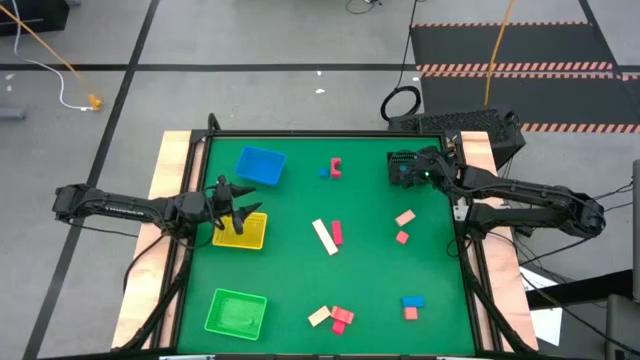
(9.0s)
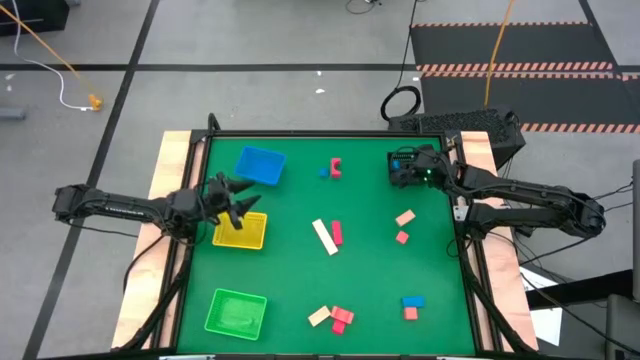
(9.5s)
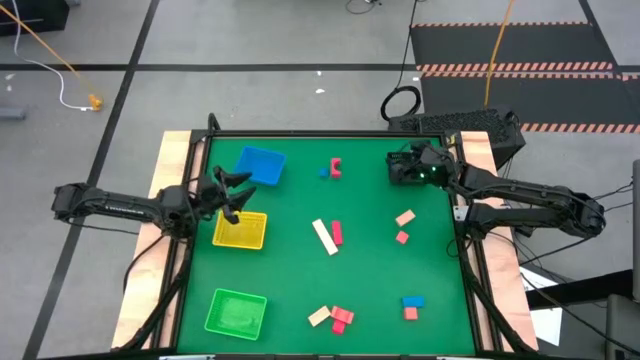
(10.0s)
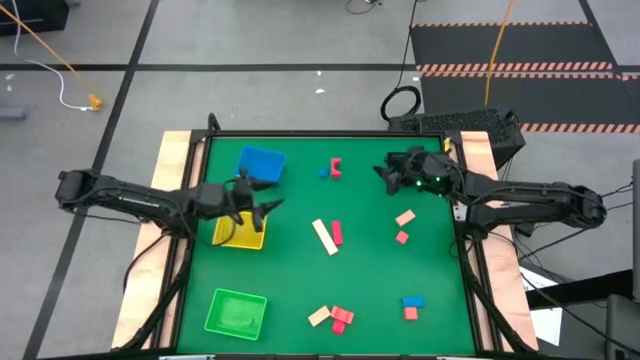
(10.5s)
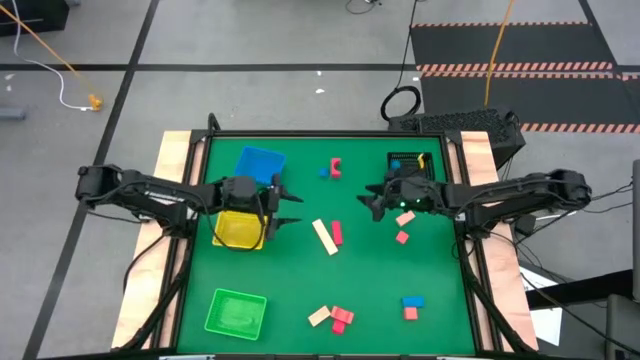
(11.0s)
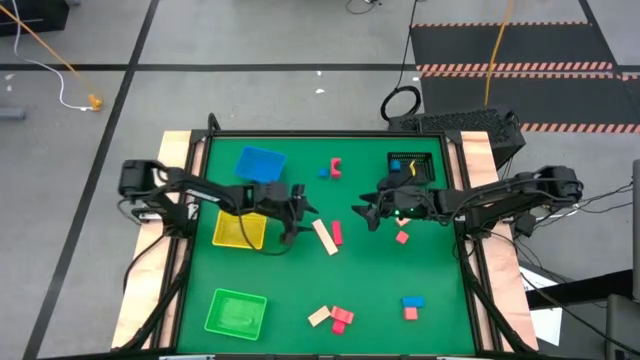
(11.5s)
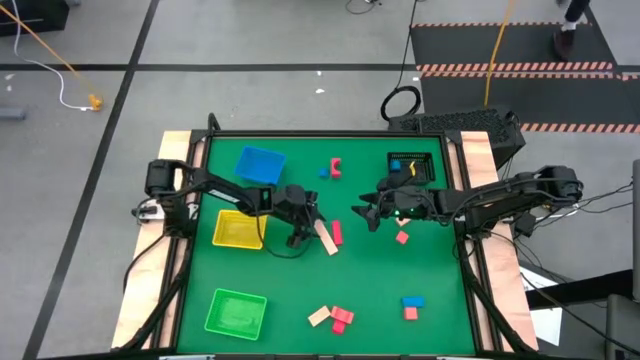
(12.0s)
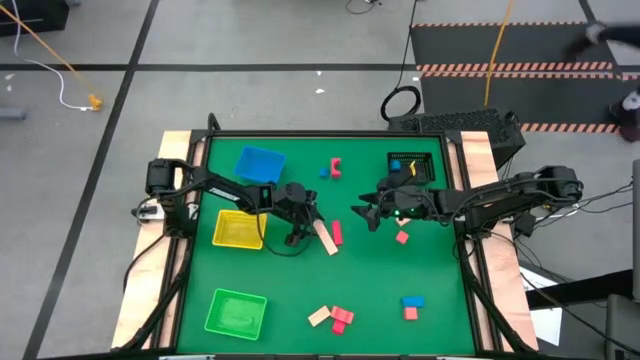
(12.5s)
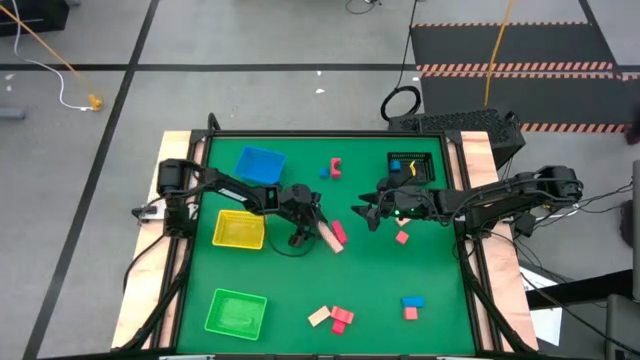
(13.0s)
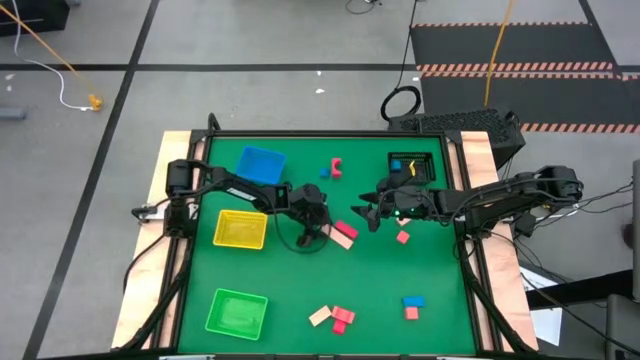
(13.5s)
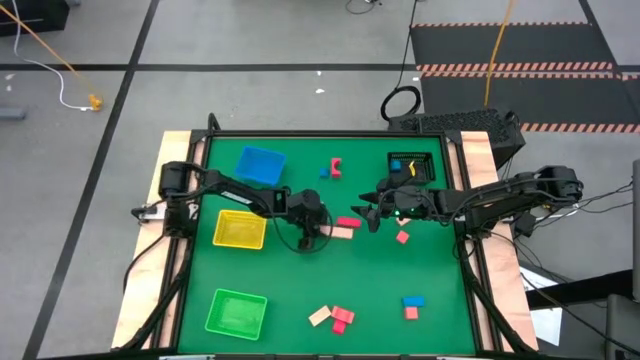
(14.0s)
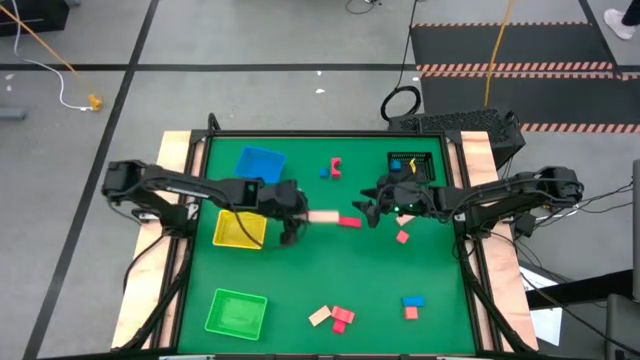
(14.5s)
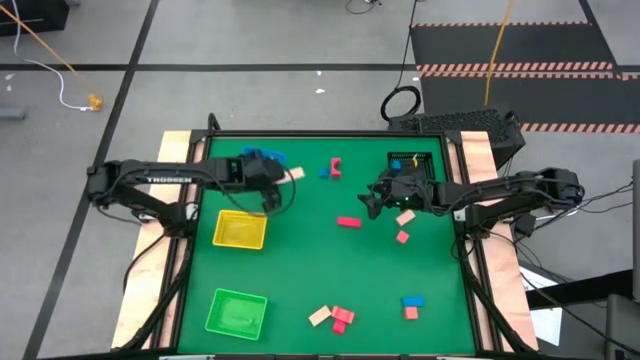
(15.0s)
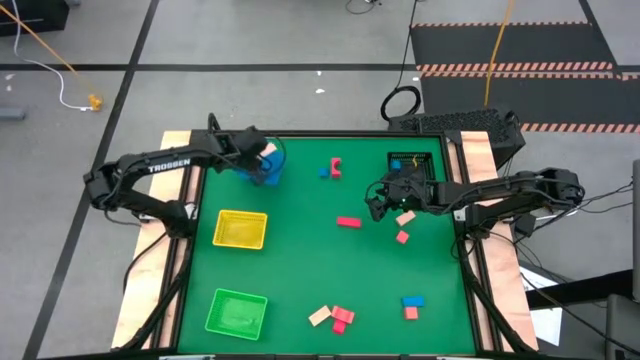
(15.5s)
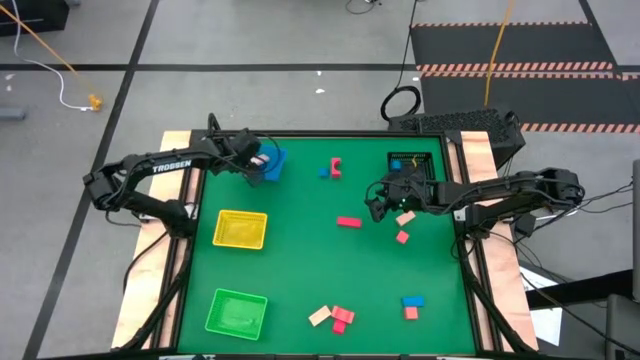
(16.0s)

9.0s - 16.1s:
Task: Sort & place blocks by color
Put the middle brown block into the blue bin

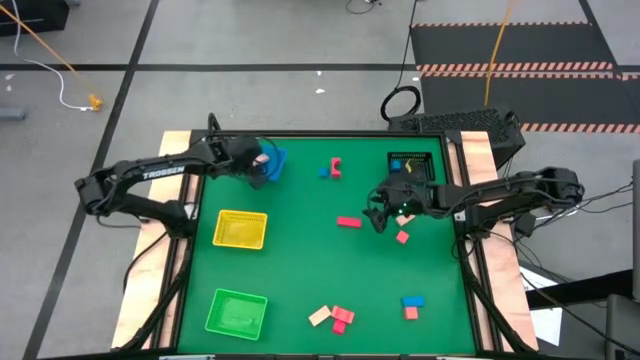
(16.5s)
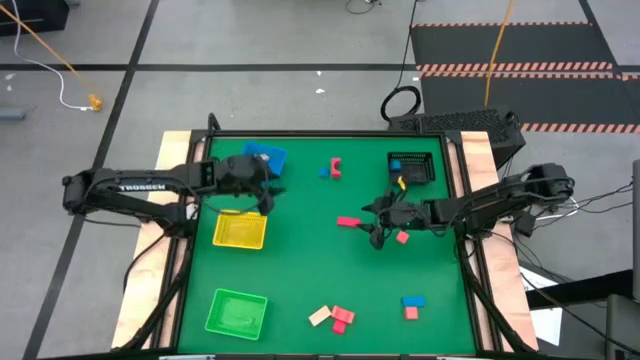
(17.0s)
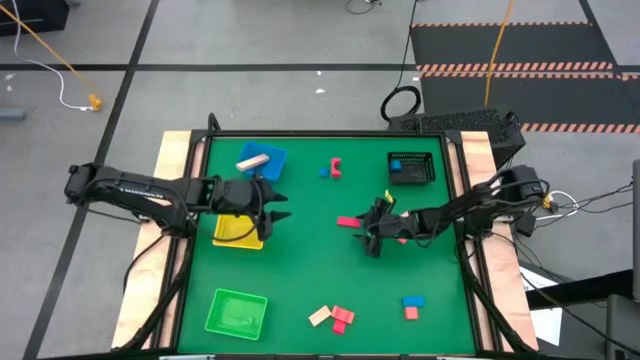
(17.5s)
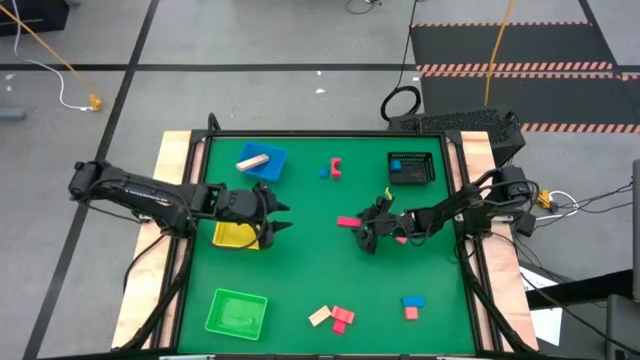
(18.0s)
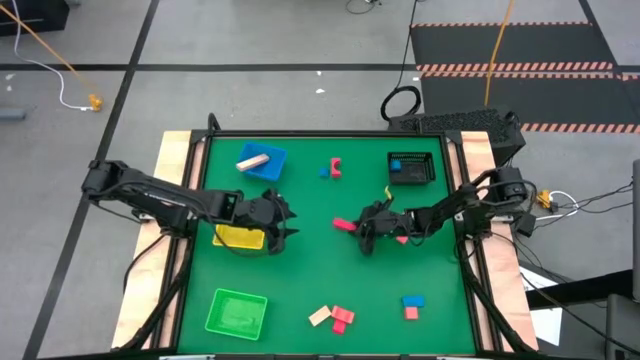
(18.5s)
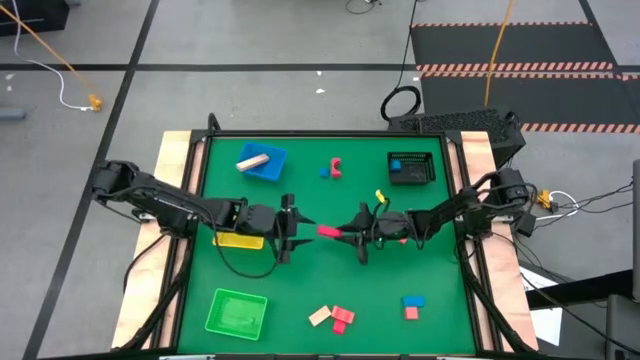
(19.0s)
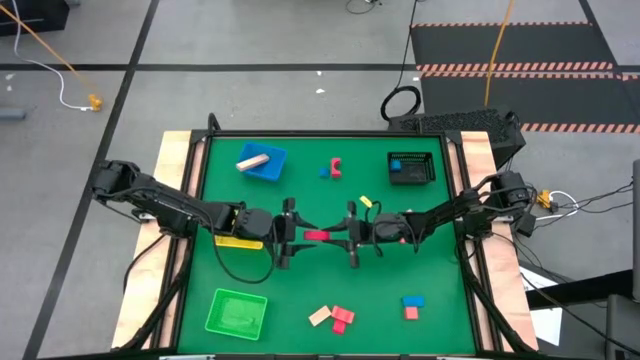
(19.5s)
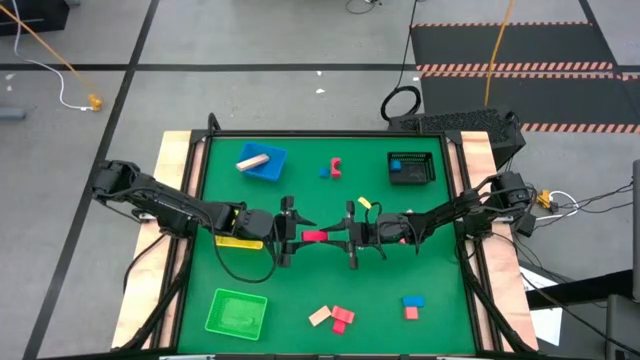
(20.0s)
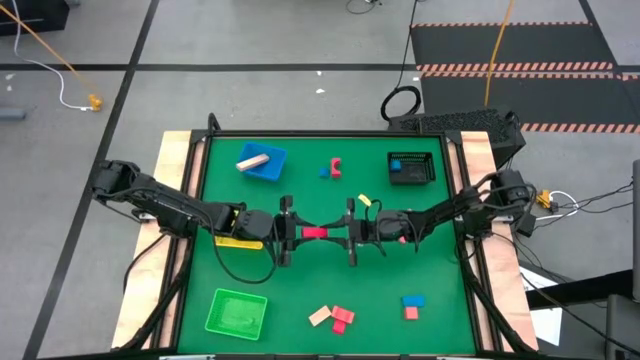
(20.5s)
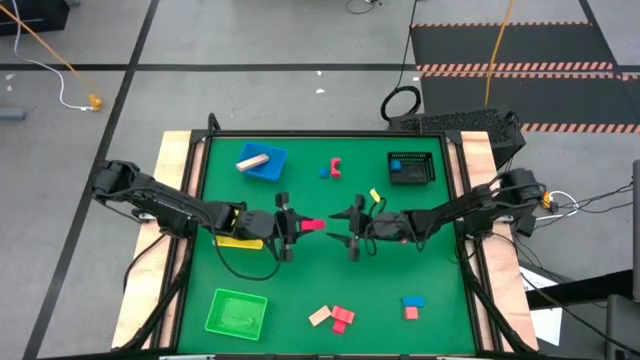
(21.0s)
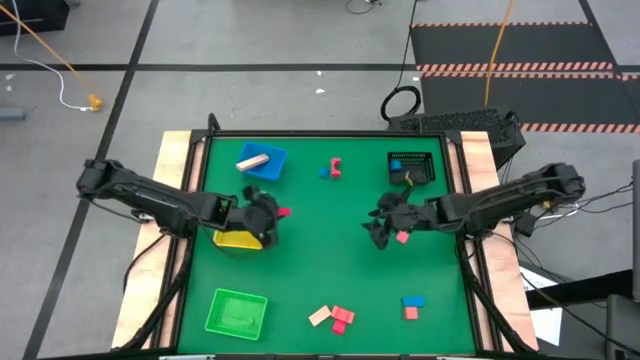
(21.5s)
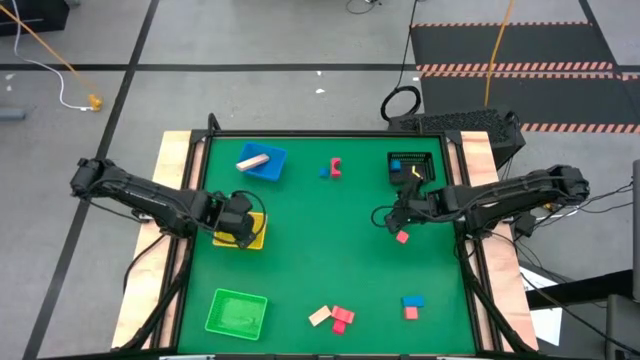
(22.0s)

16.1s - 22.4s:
Put the middle red block into the yellow bin

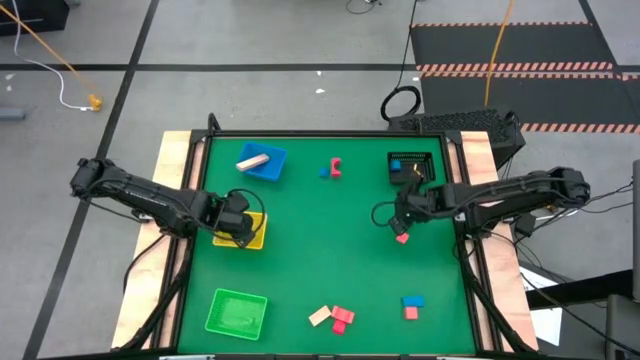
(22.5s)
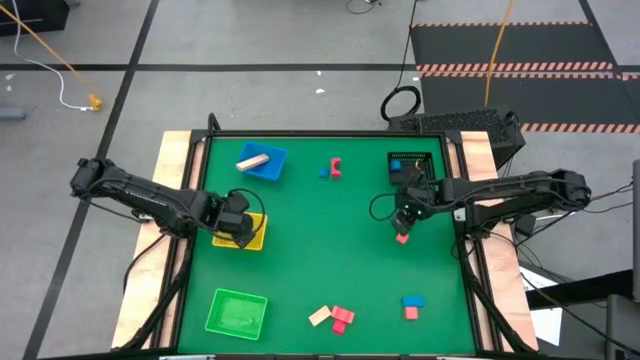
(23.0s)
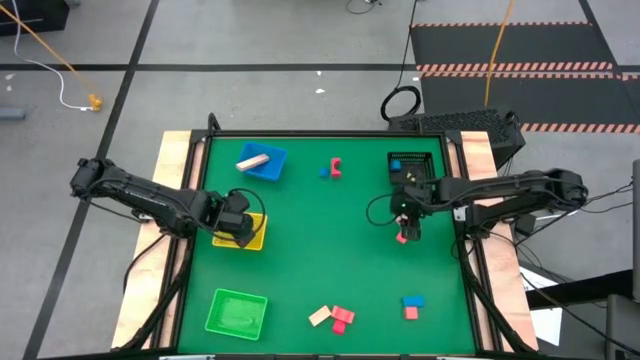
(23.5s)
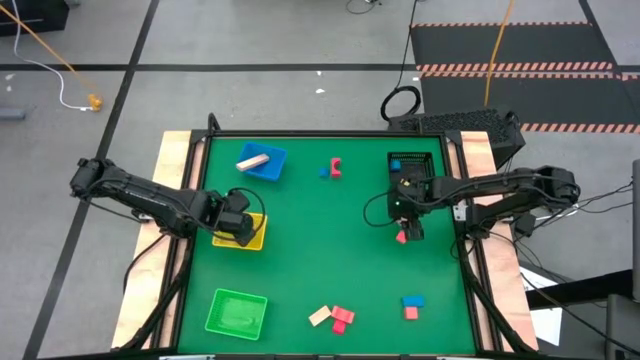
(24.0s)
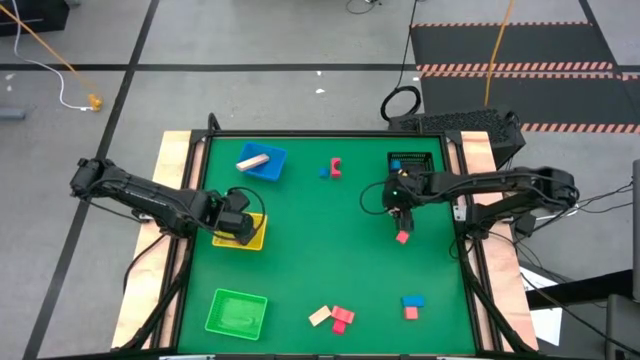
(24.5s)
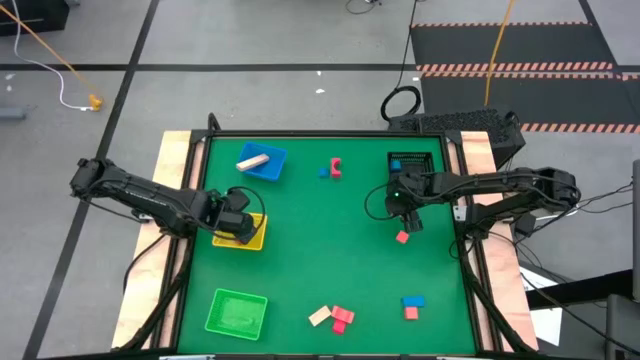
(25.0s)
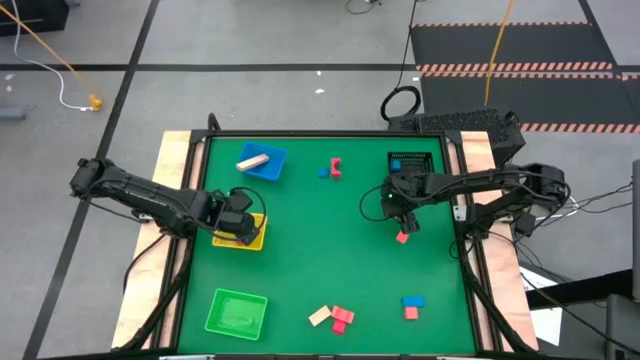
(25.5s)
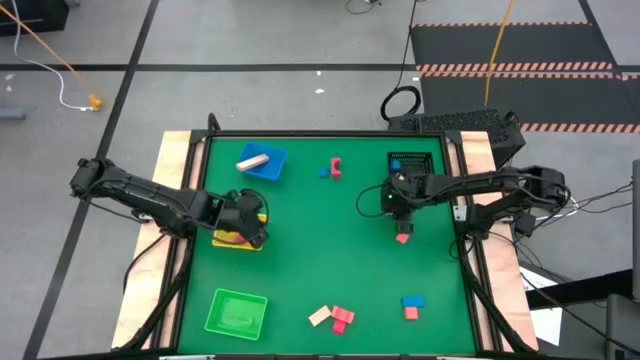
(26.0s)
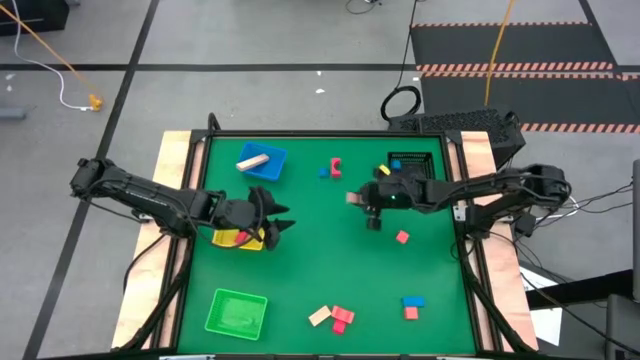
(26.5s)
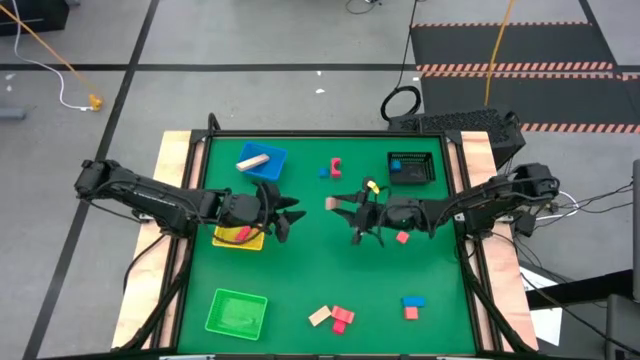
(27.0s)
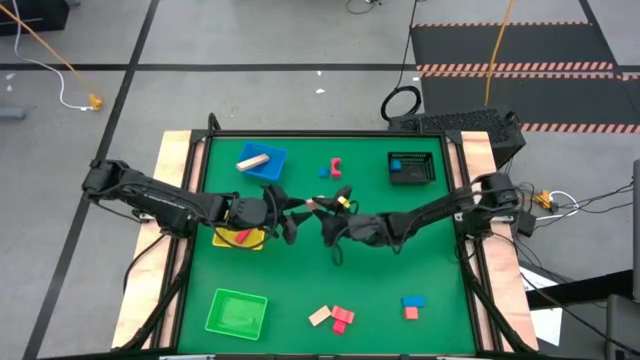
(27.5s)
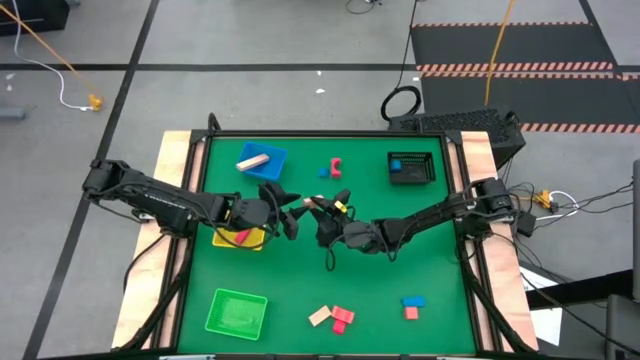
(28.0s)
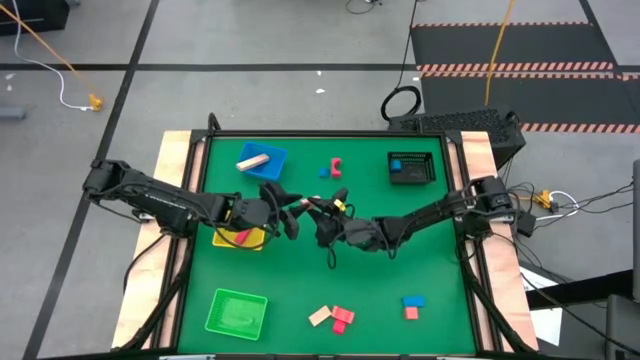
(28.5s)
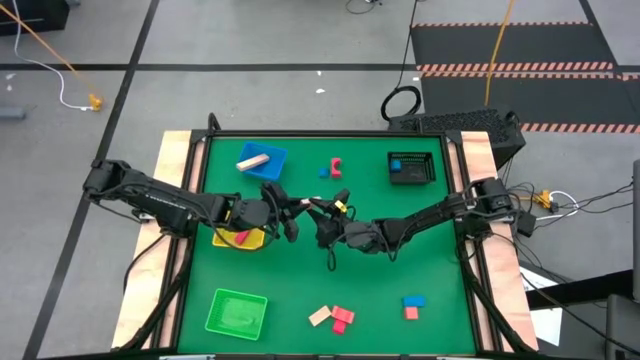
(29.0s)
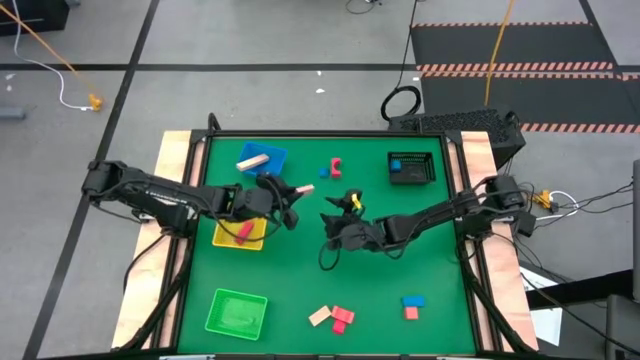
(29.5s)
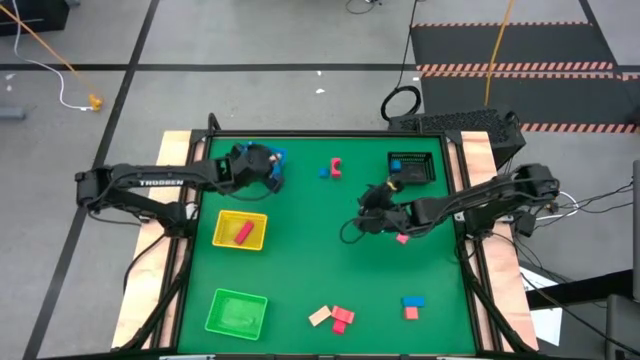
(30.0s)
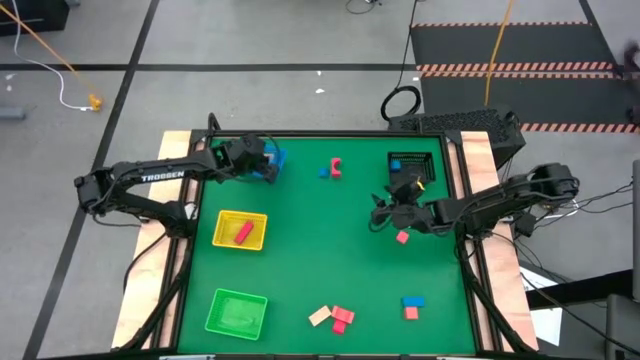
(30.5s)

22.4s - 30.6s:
Put the top brown block into the blue bin
